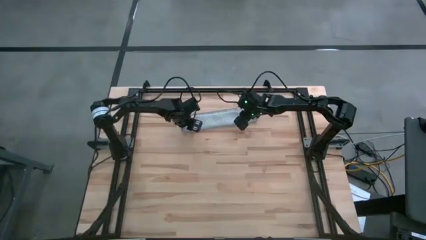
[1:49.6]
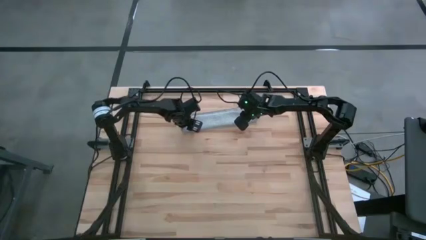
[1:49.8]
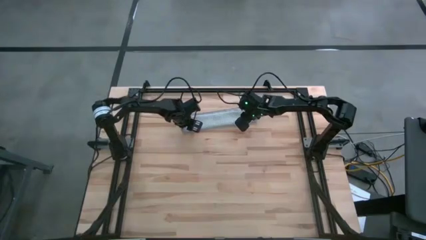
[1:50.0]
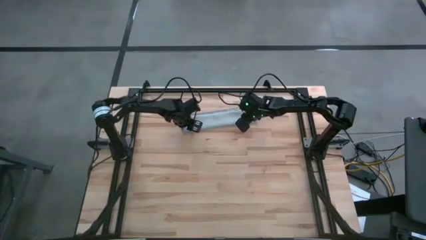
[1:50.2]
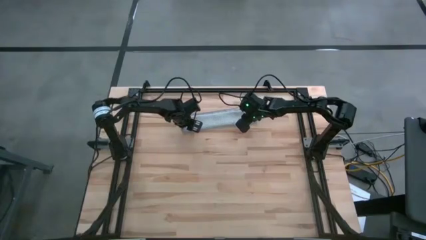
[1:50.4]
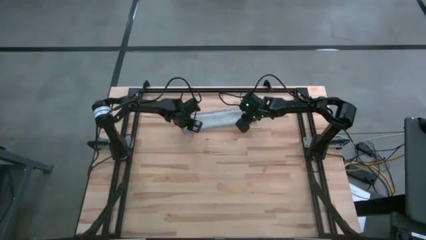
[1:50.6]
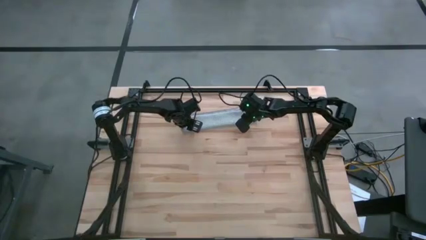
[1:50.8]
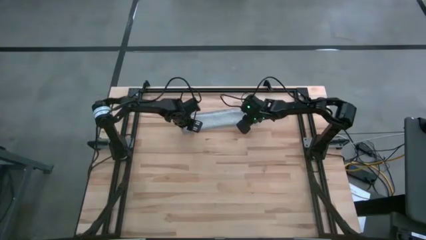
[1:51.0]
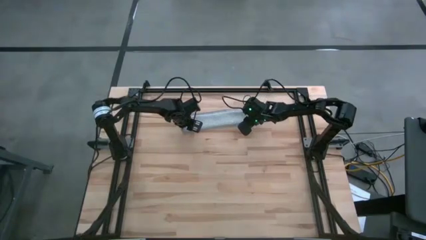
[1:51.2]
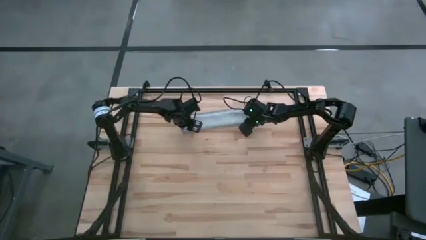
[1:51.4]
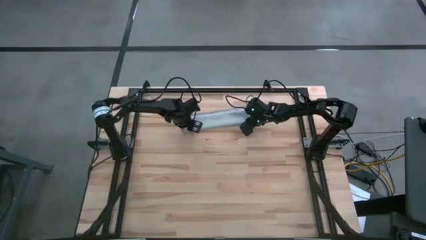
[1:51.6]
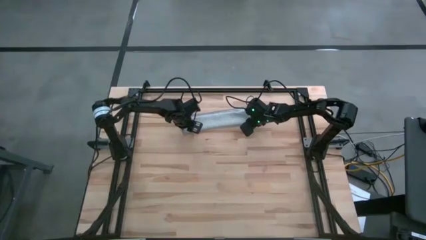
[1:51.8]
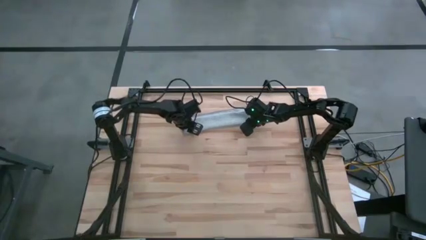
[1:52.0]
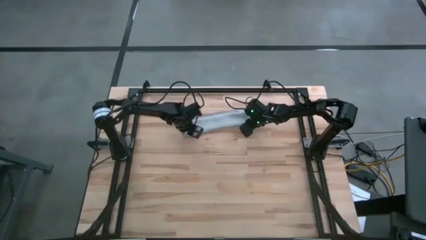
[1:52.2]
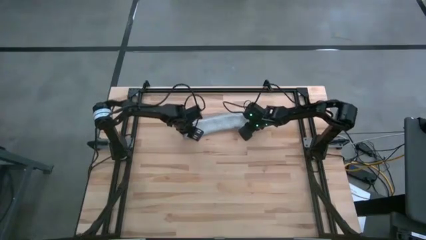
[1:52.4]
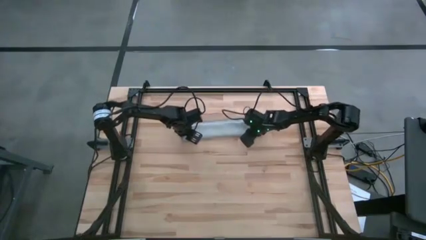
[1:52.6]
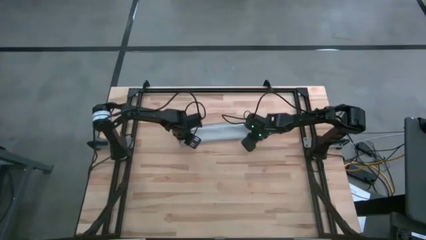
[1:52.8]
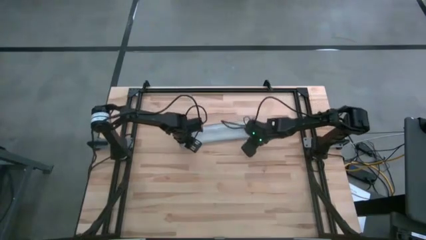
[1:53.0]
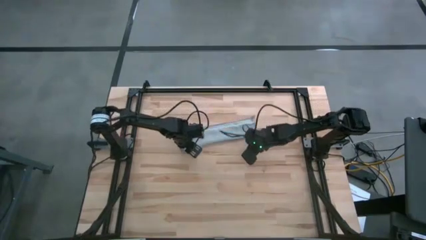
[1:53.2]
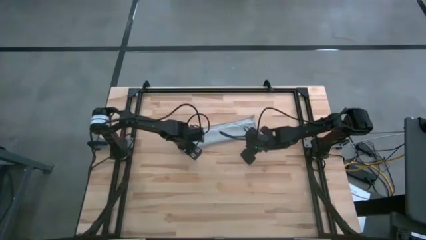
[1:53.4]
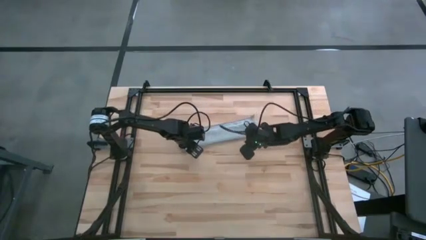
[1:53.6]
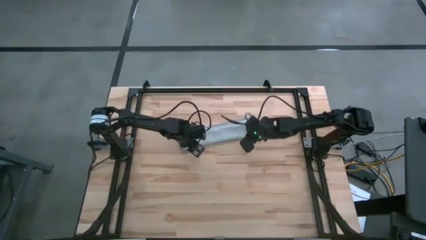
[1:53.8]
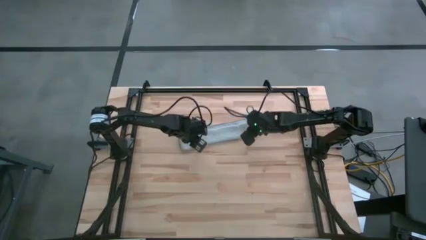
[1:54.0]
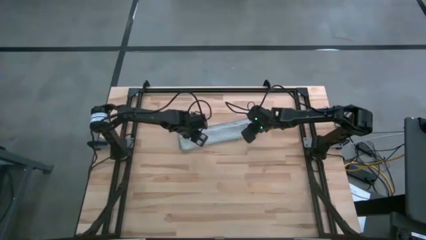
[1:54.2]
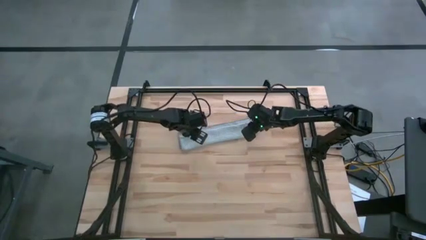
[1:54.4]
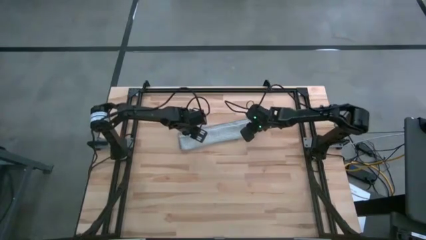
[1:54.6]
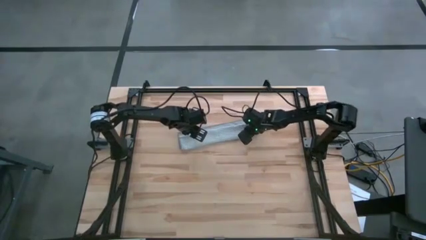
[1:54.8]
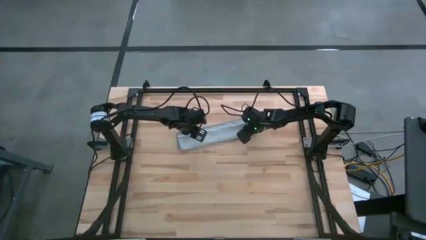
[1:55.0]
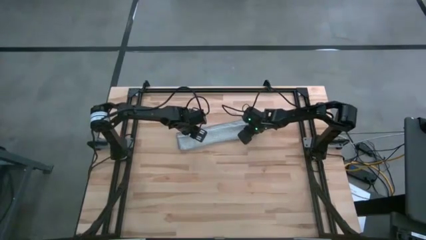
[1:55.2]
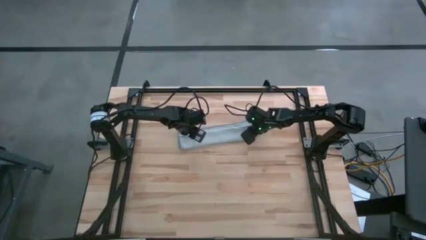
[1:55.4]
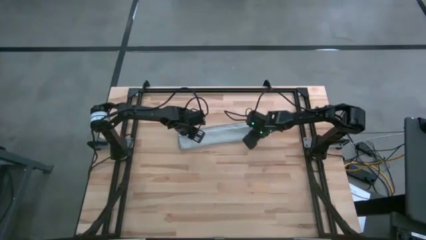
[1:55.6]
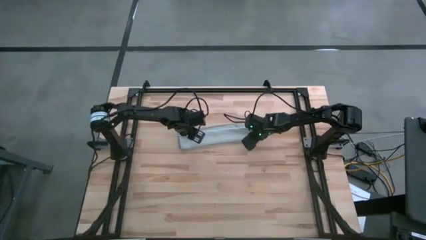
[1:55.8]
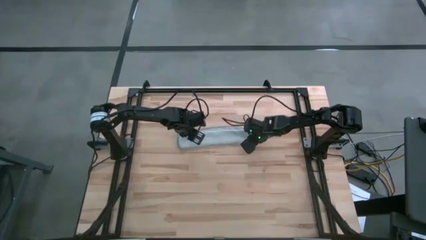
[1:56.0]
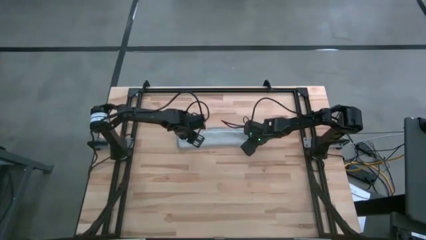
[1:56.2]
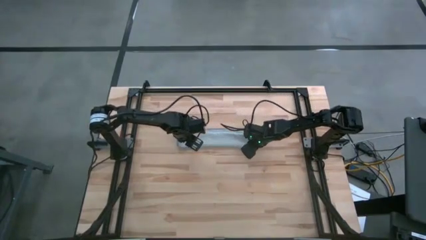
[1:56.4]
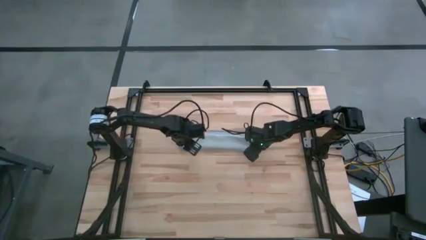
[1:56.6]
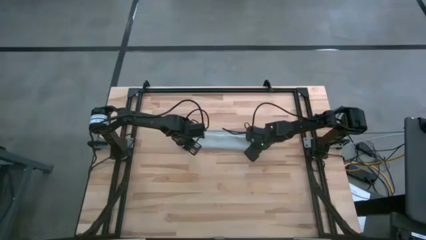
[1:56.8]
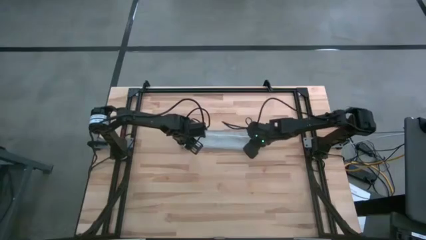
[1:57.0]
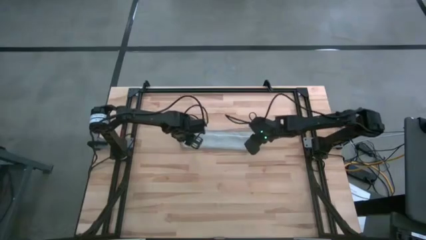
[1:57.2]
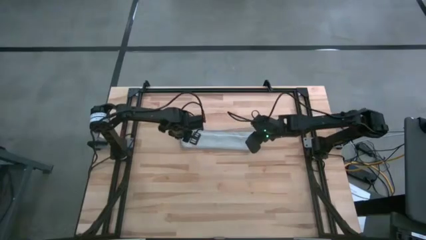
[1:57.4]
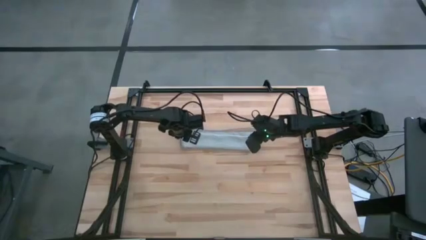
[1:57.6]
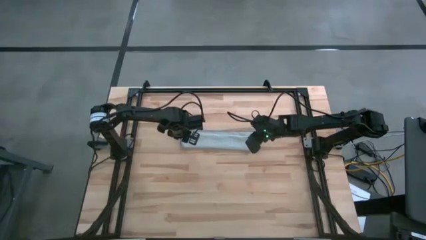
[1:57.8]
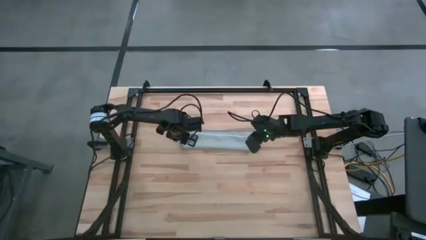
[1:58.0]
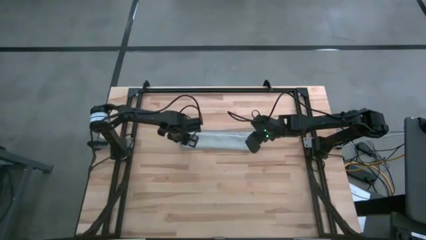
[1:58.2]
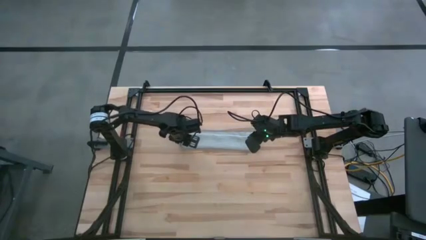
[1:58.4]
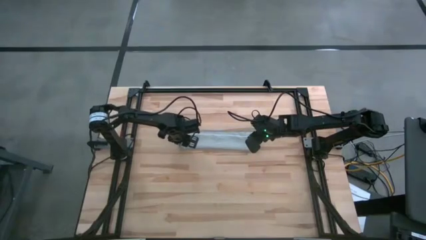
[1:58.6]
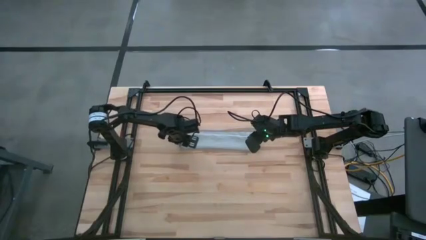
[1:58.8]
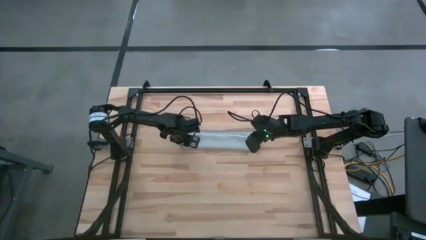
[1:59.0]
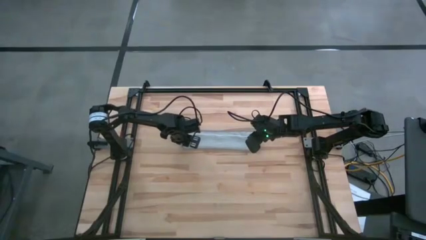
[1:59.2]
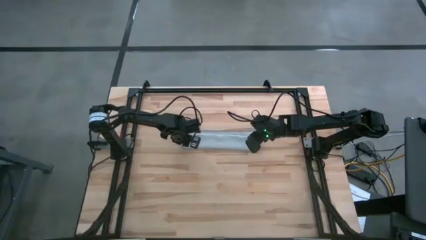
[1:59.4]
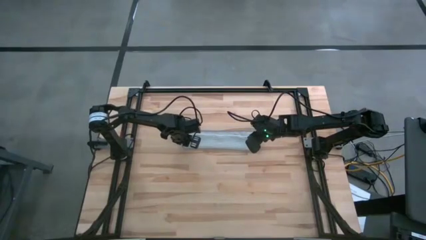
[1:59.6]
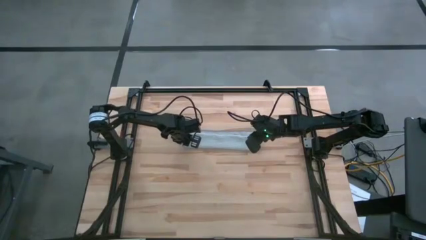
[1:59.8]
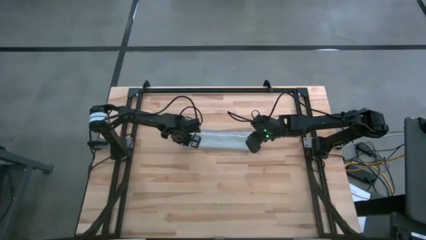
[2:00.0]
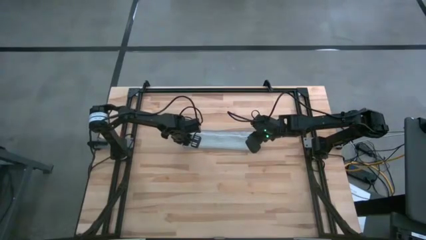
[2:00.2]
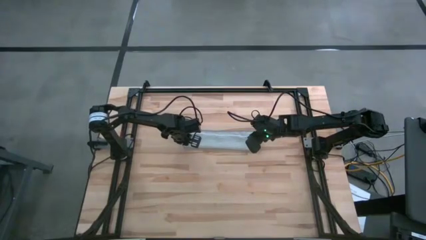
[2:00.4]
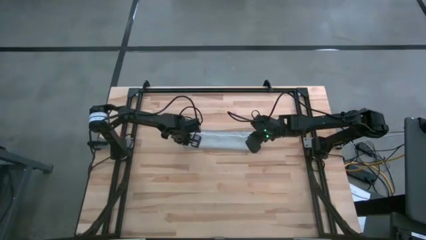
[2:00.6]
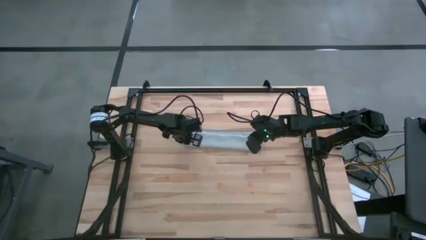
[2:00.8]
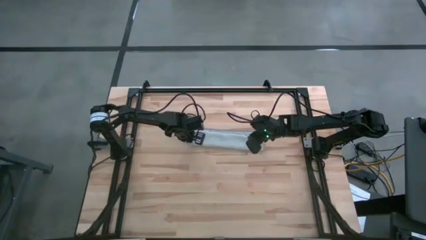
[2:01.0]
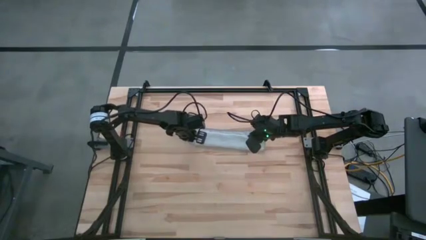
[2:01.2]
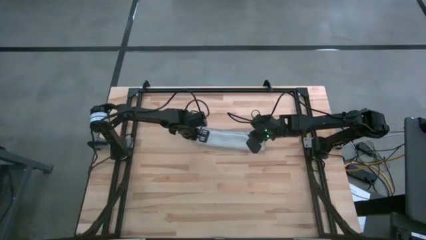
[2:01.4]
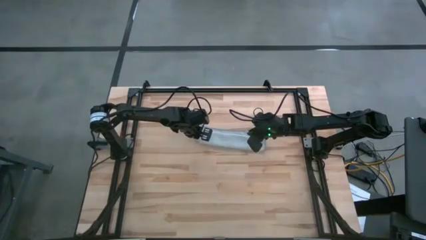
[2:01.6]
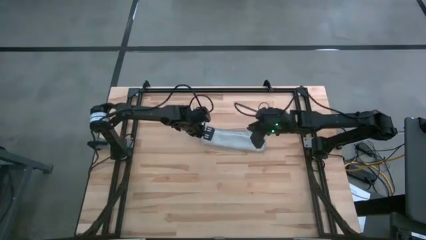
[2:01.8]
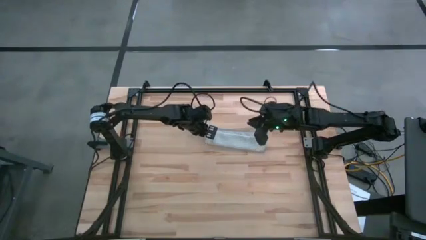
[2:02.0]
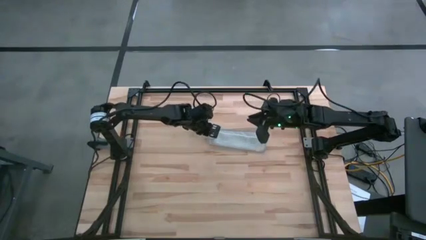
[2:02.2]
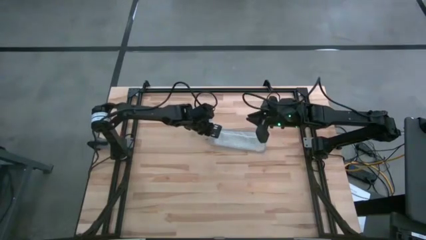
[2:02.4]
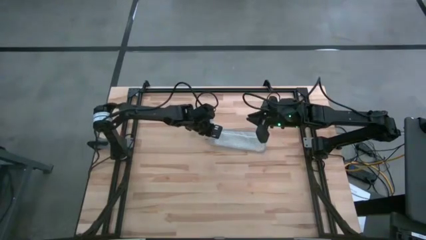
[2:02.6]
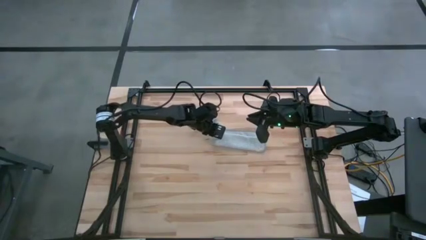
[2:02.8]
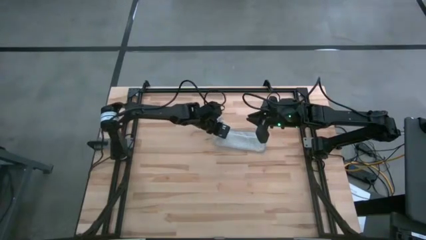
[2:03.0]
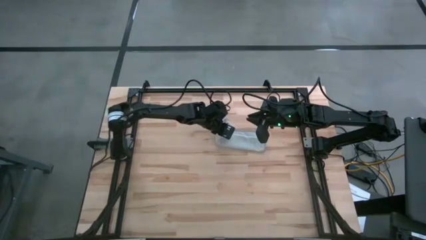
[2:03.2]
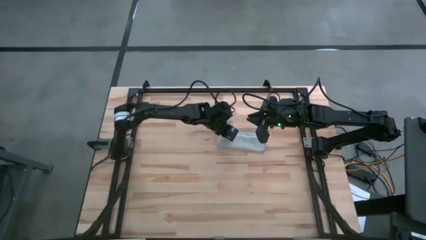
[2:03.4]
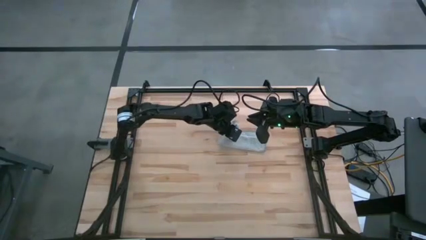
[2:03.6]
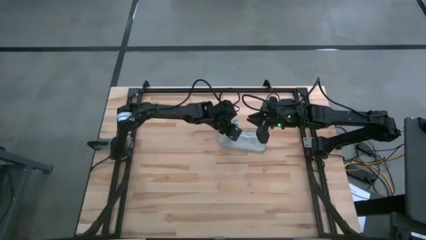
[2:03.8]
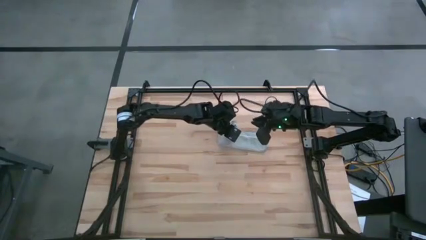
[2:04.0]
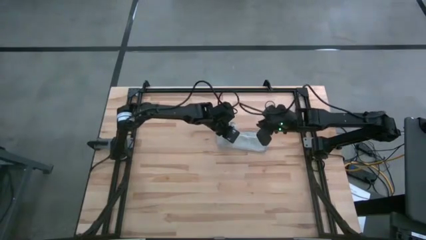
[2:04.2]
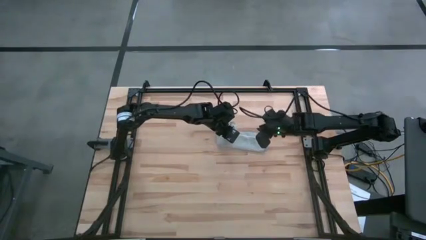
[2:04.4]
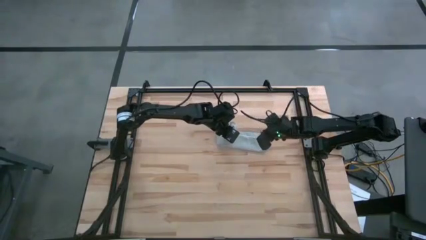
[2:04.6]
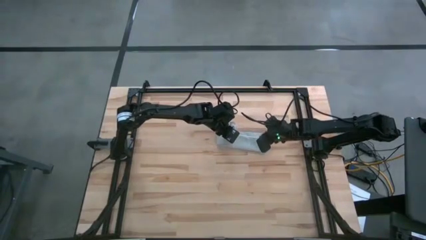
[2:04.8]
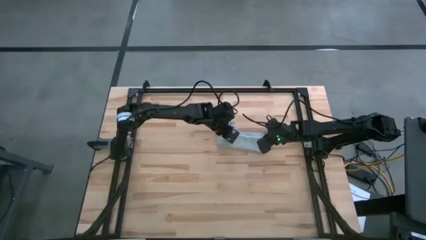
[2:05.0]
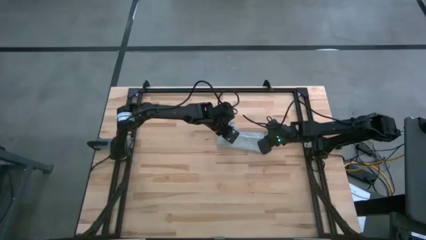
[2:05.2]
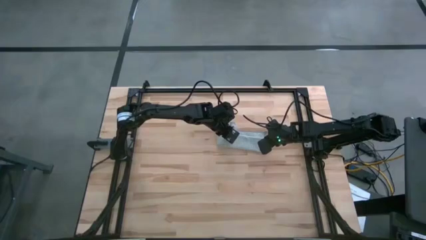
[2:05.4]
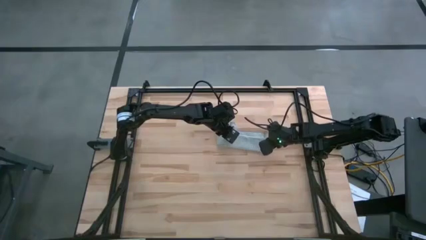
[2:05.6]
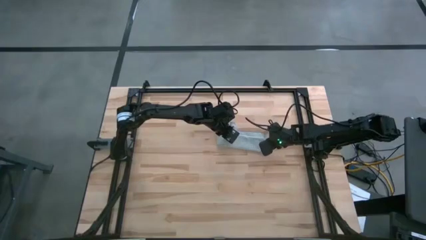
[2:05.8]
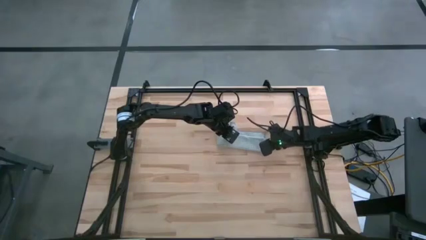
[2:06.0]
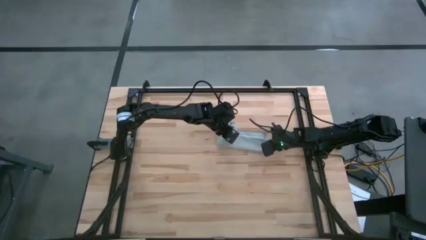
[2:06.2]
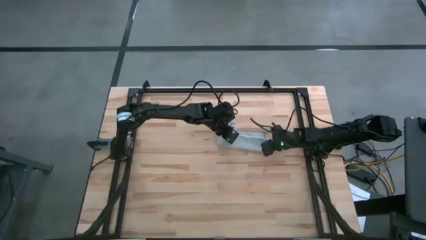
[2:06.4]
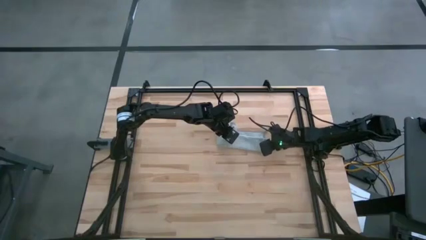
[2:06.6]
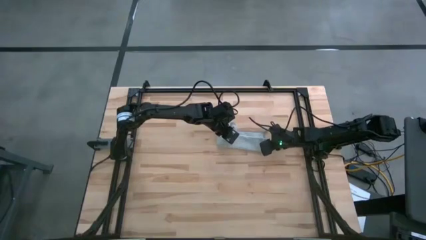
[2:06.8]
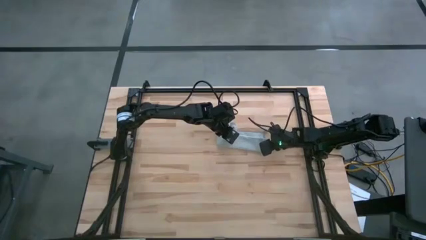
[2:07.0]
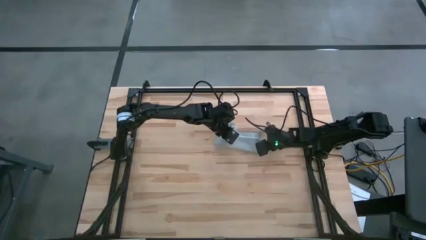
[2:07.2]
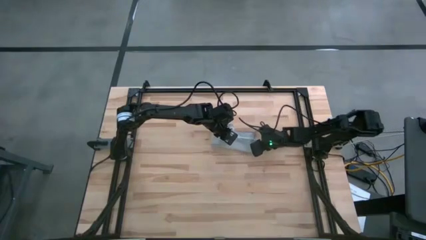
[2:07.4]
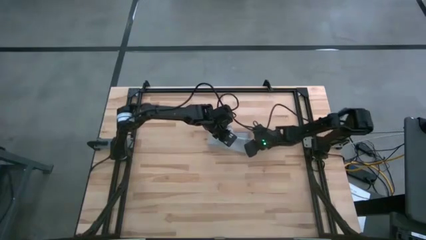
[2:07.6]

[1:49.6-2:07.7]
Task: Fold microfiber towels
Fold the gray on the table
